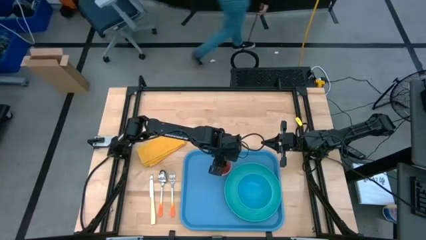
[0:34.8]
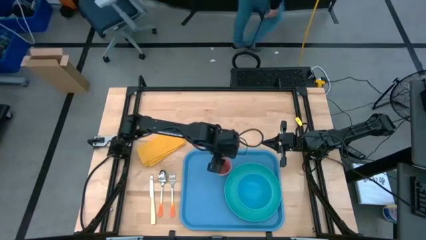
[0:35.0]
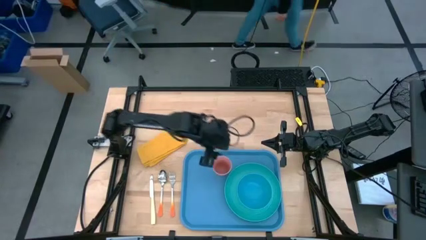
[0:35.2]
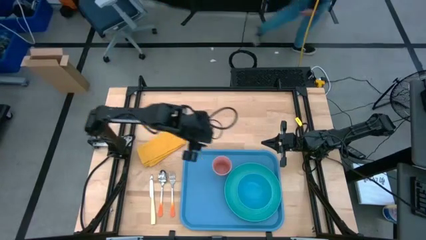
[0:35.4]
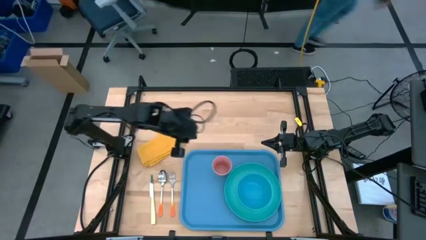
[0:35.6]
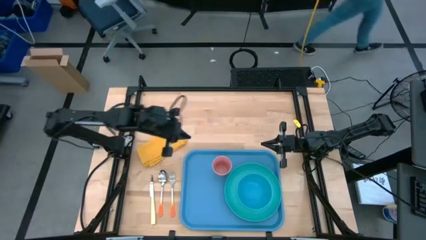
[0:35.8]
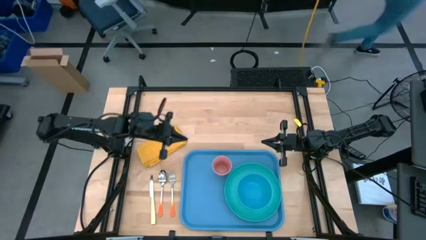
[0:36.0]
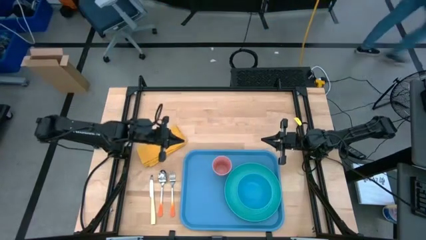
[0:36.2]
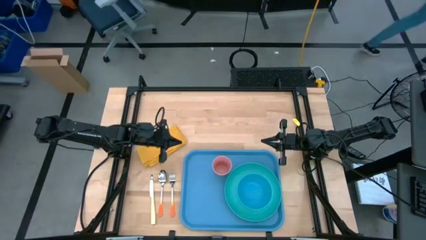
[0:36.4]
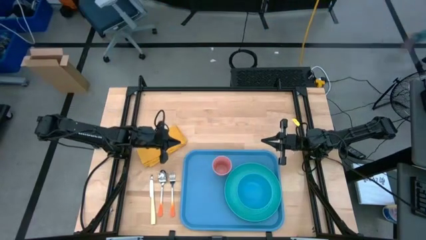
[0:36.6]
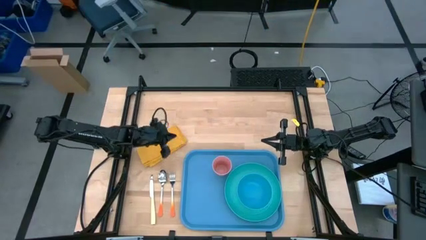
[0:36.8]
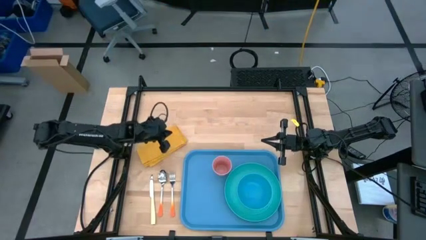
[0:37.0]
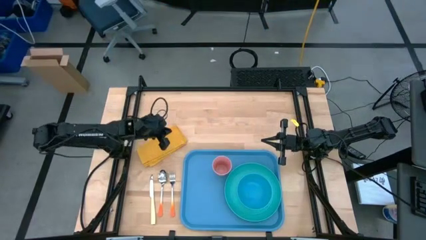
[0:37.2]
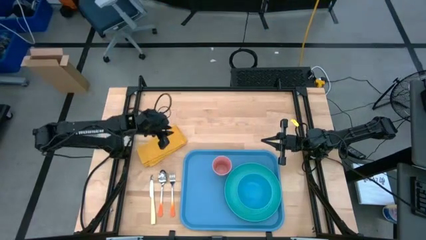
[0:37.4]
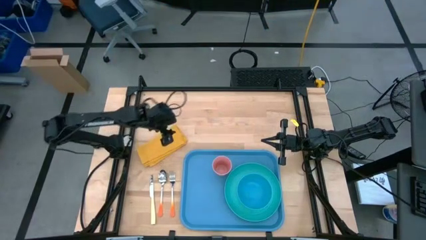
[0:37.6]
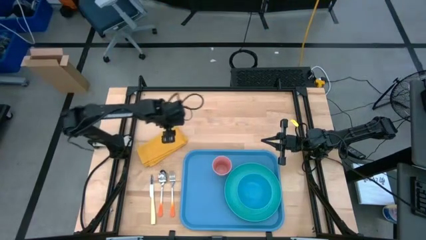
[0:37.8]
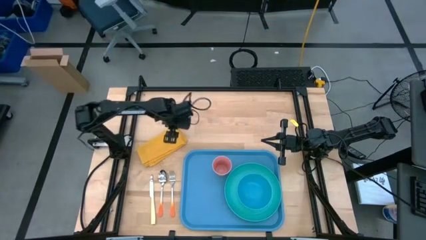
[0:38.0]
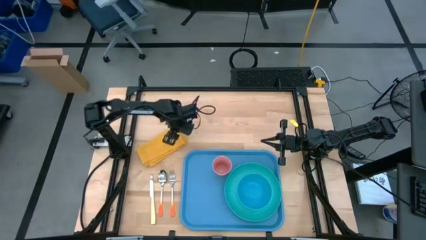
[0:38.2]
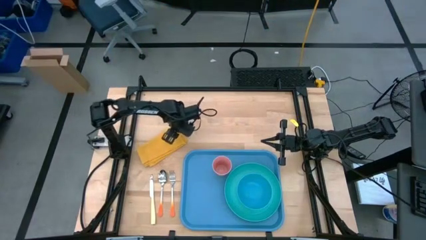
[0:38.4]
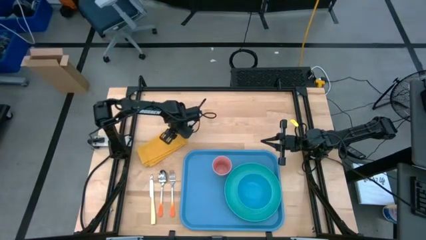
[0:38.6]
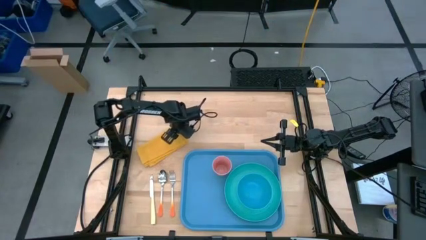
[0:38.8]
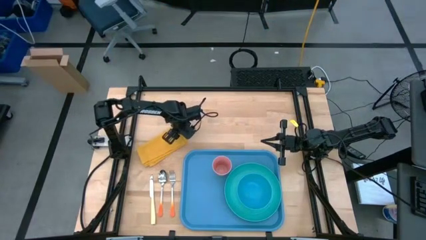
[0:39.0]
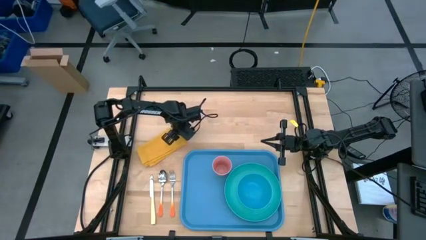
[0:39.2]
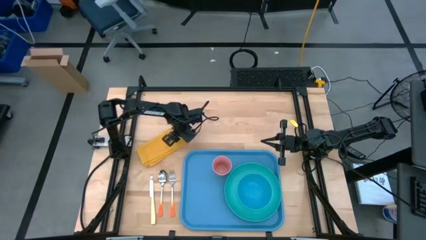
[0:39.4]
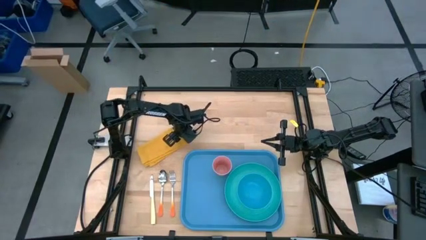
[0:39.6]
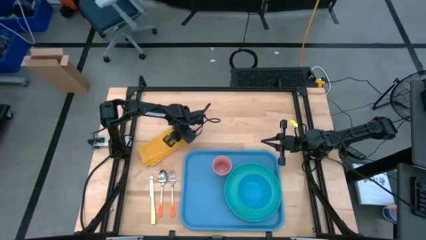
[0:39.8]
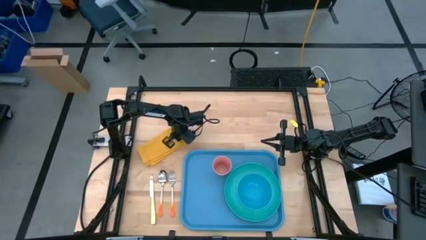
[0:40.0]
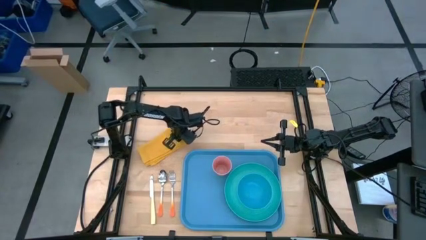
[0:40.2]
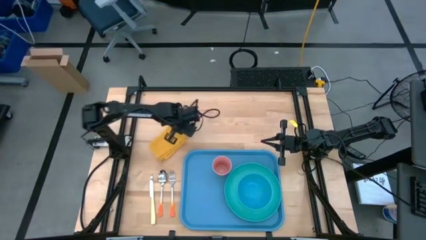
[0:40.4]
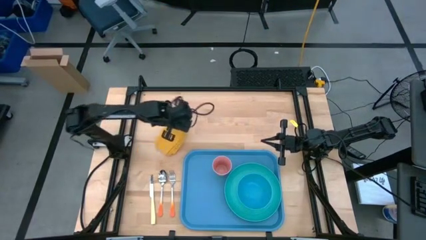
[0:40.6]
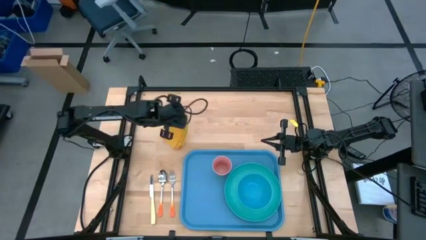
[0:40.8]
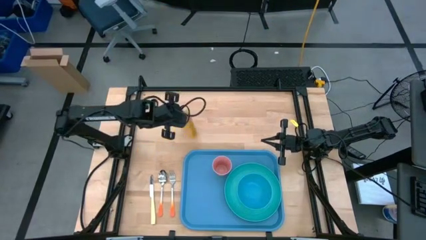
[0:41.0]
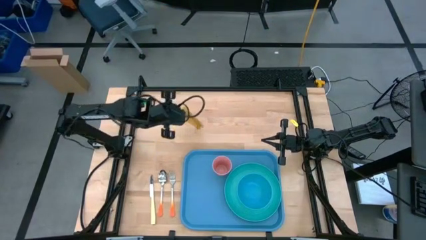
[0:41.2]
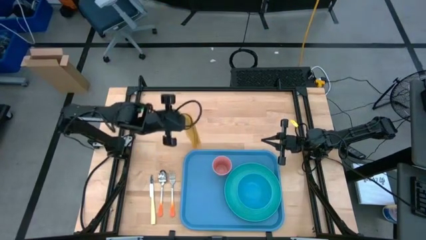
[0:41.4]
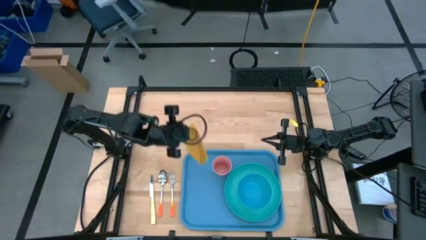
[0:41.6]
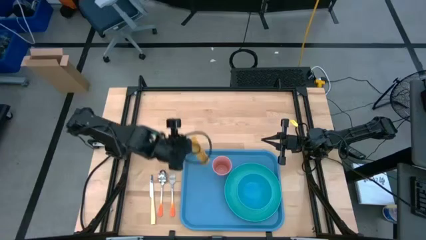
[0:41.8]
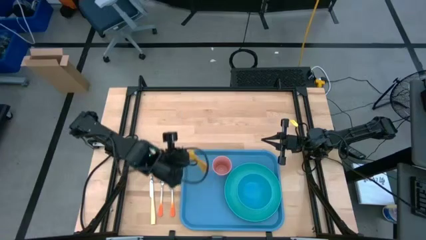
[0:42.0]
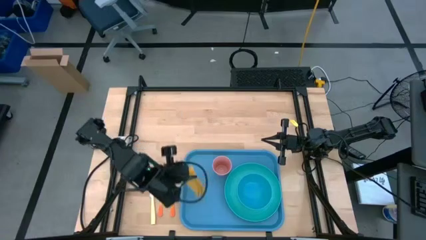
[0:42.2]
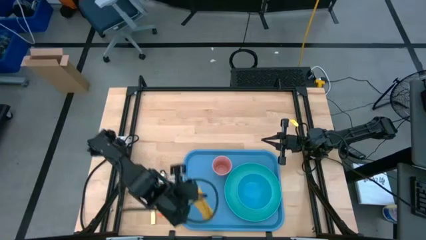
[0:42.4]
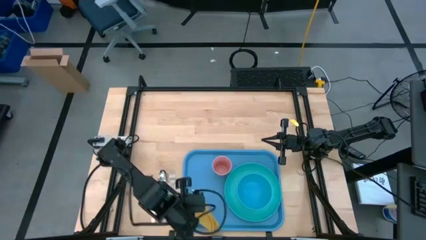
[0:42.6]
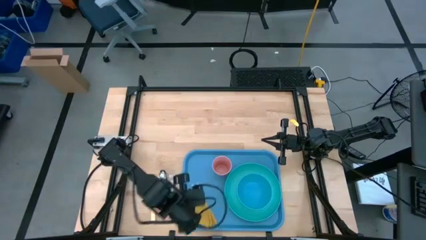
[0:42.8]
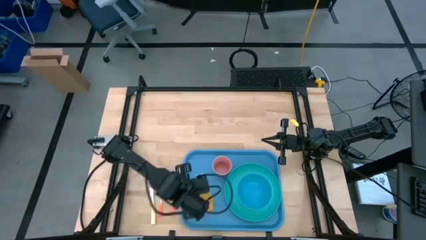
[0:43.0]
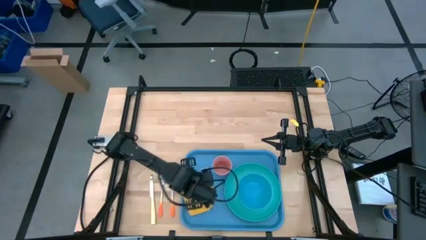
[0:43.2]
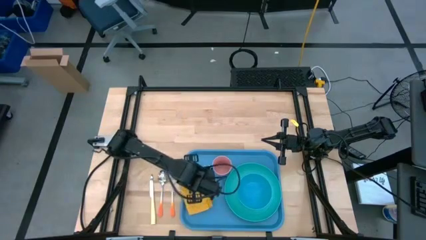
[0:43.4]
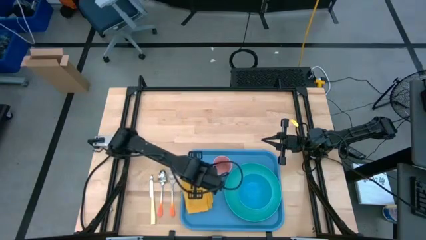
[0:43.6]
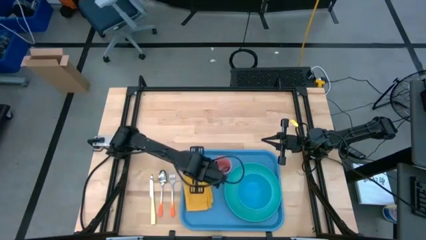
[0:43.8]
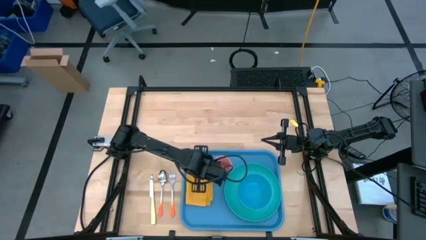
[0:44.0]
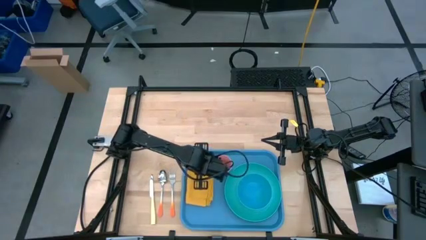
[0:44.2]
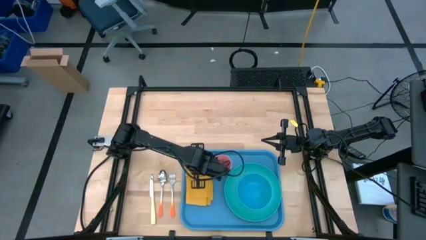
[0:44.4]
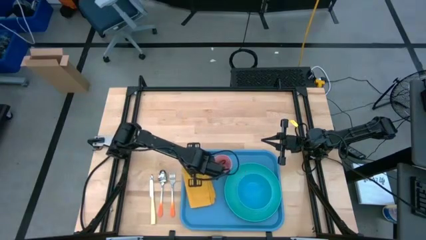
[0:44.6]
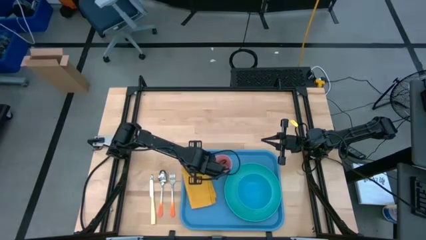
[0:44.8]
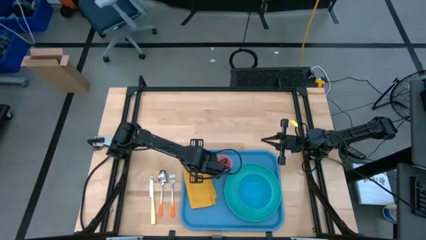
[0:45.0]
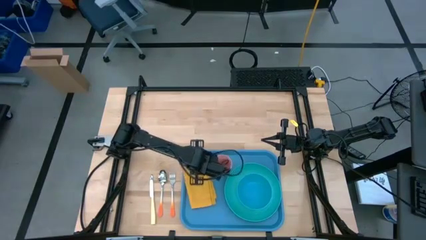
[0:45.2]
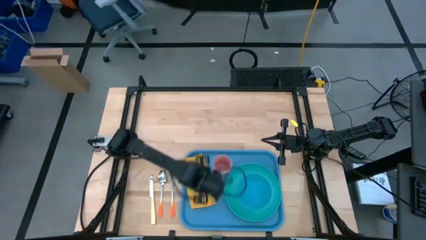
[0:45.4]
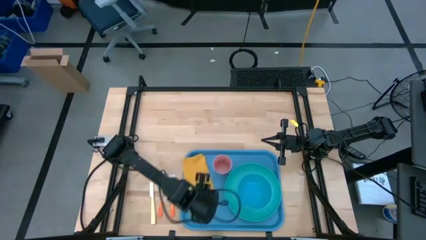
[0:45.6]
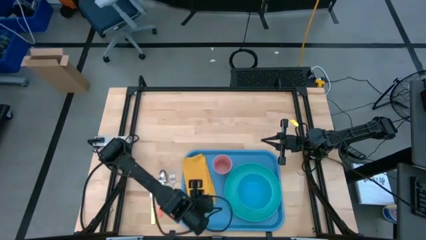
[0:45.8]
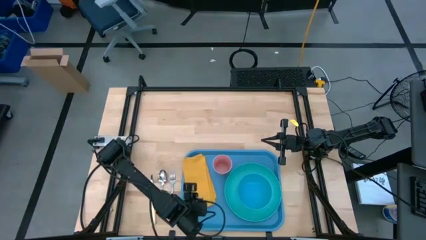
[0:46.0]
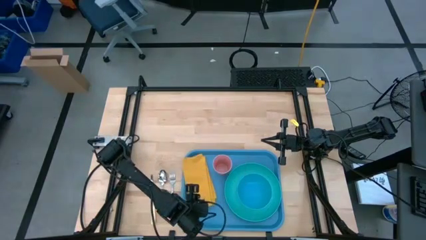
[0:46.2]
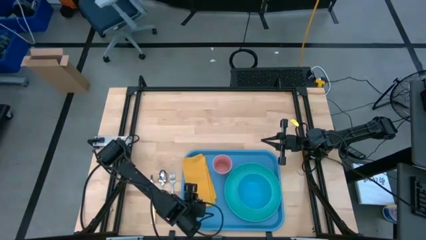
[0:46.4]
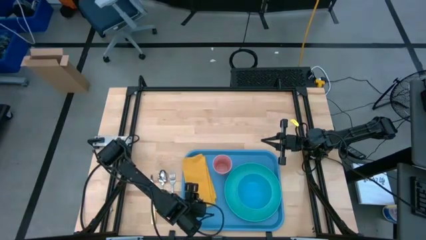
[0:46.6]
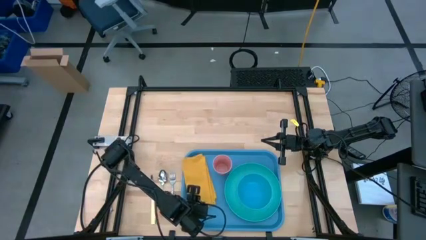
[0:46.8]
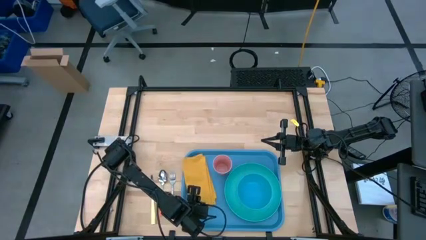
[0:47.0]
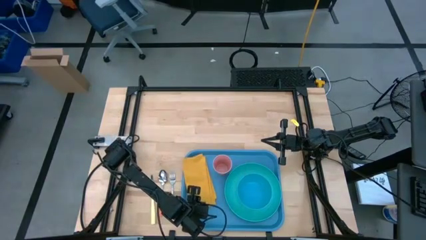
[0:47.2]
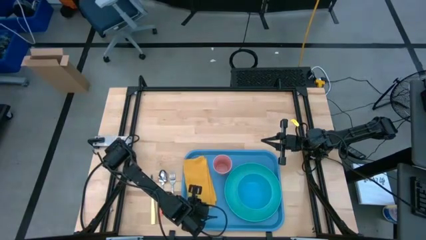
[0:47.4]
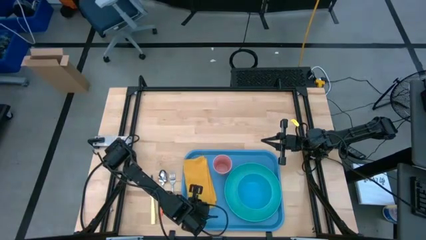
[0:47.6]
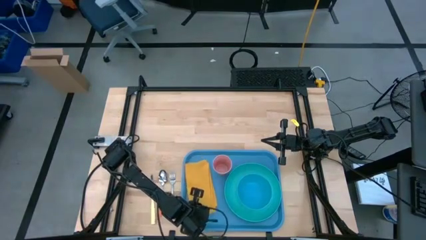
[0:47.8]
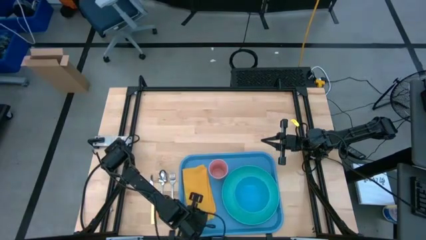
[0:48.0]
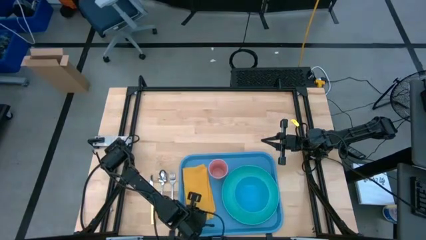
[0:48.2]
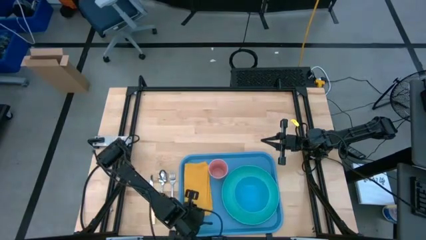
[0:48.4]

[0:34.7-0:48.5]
Task: Set up tray
Put the yellow napkin on the blue serving tray
